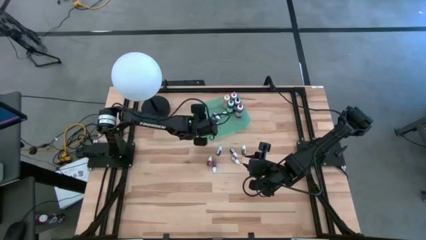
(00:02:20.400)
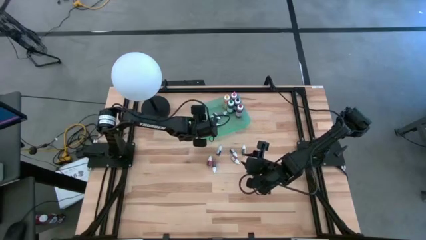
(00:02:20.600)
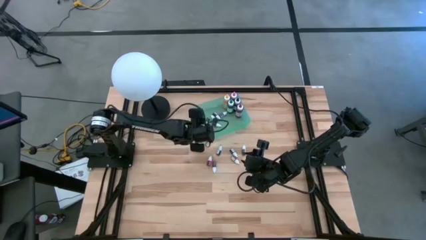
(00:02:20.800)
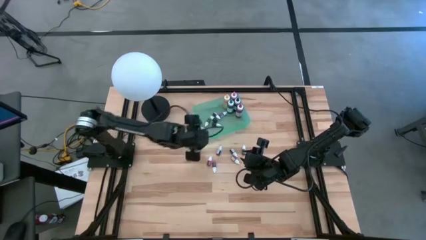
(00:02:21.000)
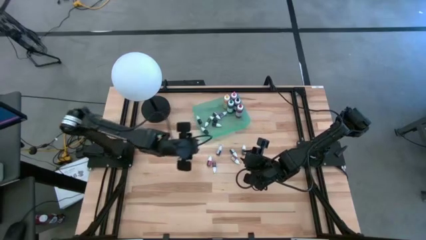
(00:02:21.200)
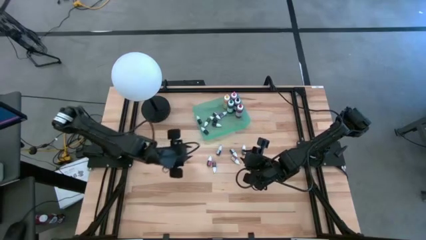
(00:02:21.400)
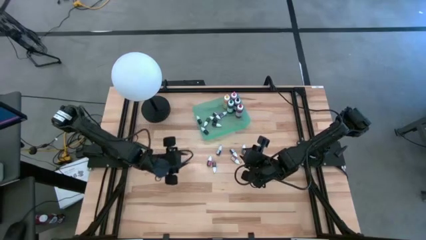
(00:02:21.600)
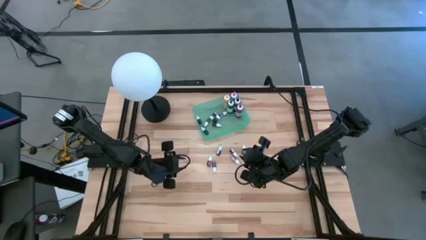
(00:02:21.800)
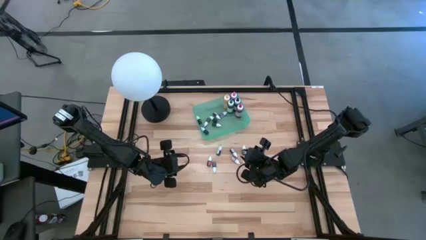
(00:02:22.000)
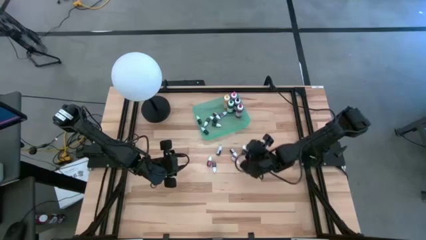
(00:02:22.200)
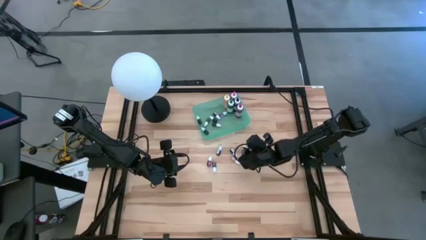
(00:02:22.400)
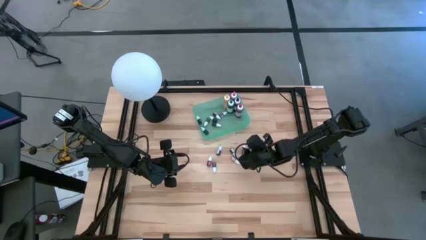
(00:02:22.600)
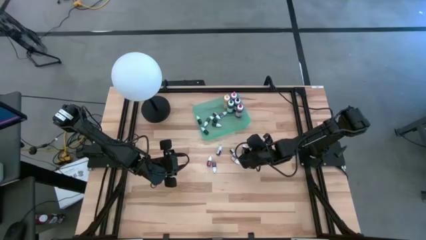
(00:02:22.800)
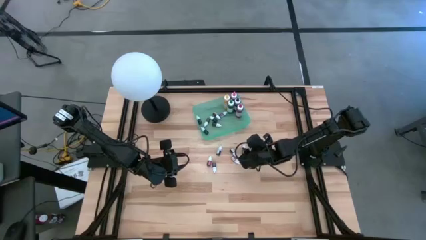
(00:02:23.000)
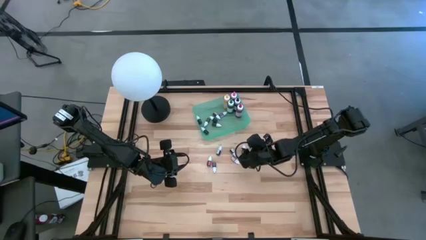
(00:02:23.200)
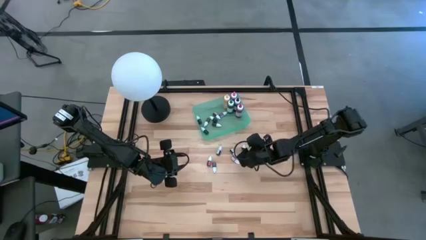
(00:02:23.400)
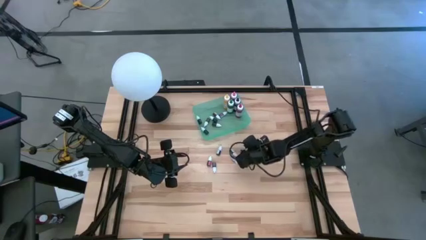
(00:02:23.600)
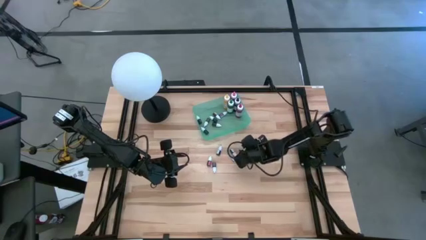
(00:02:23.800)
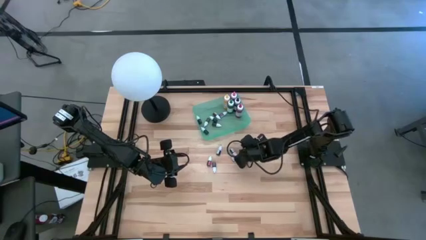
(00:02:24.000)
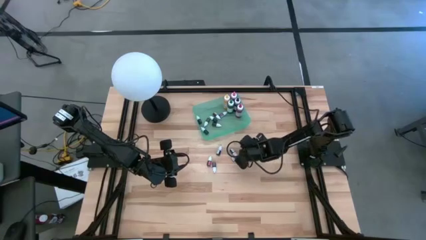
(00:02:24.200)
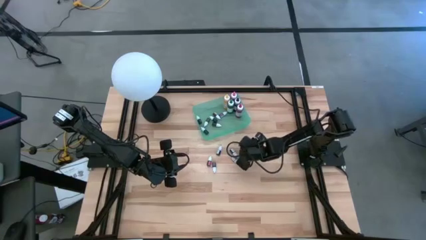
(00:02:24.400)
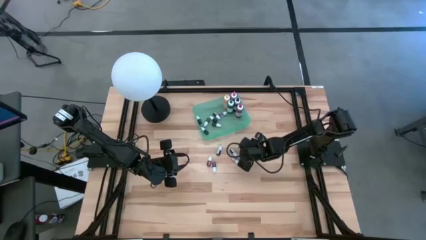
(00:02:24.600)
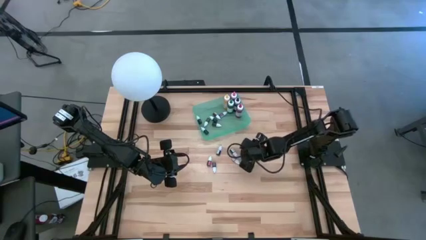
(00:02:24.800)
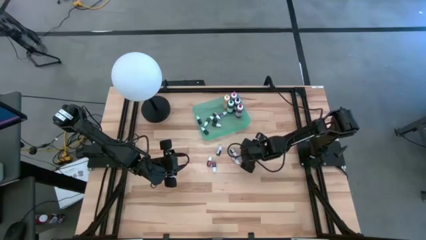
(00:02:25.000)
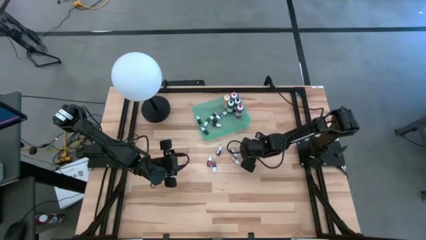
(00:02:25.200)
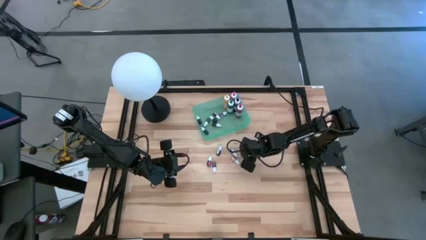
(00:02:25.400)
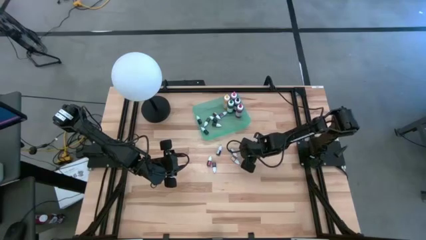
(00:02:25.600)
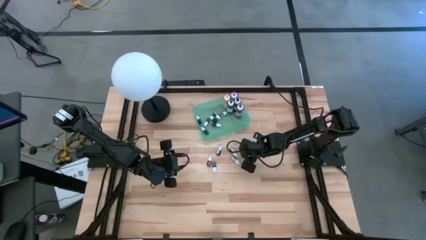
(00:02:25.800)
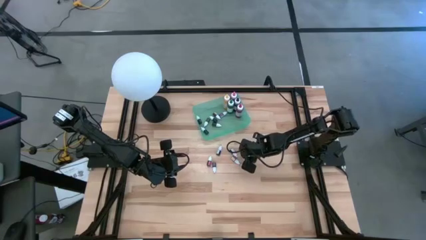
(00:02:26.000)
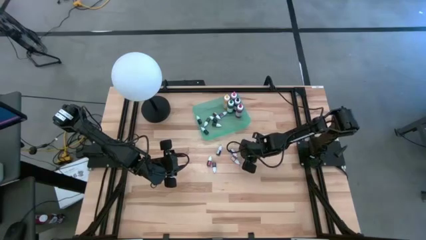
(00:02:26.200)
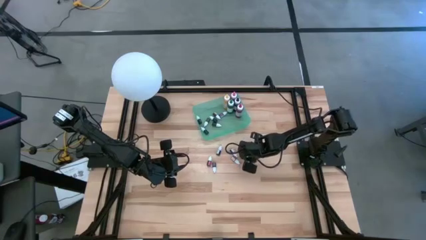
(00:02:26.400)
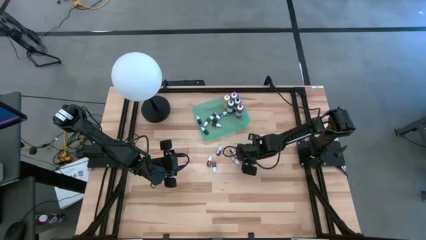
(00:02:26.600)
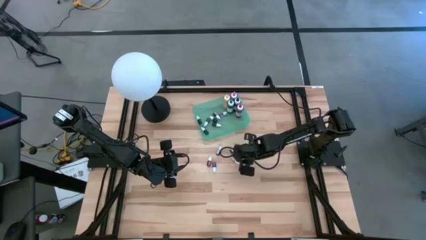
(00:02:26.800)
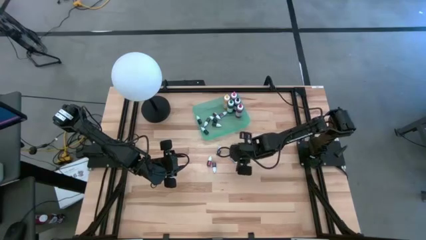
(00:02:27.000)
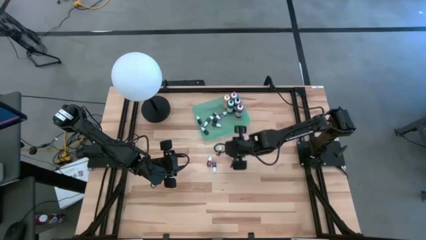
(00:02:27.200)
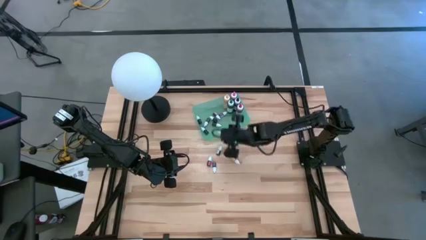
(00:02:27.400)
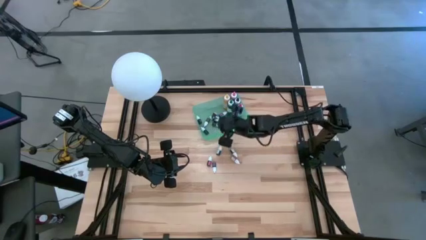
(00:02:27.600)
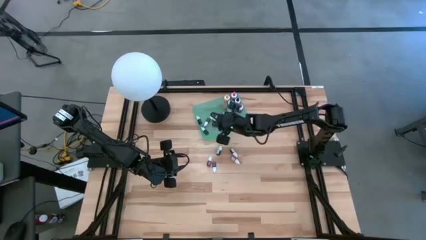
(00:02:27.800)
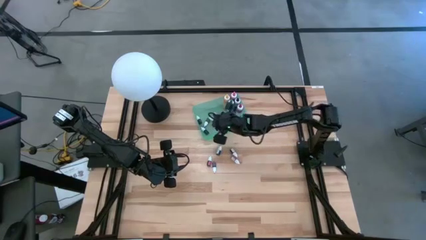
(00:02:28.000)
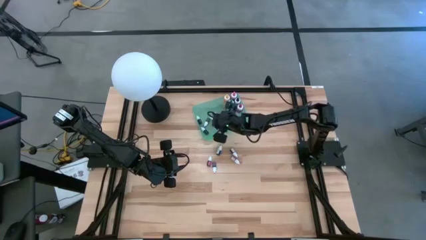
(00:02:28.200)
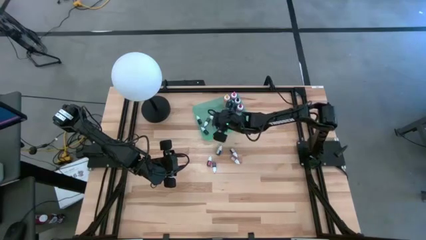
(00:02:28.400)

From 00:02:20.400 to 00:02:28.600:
Task: Pick & Place food coloring
Put the brown food coloring bottle into the green bin

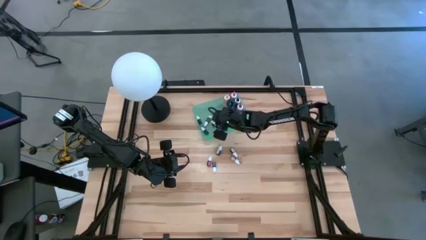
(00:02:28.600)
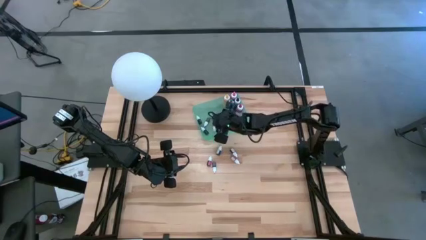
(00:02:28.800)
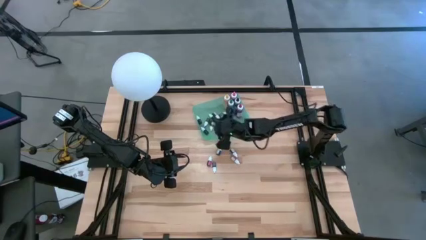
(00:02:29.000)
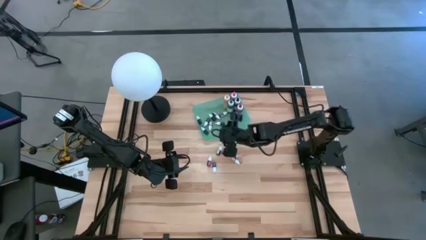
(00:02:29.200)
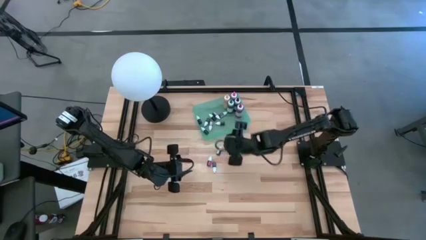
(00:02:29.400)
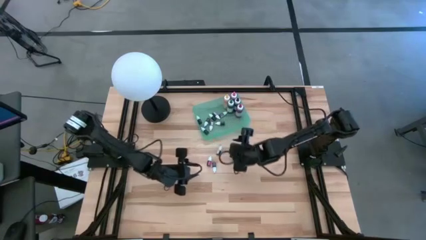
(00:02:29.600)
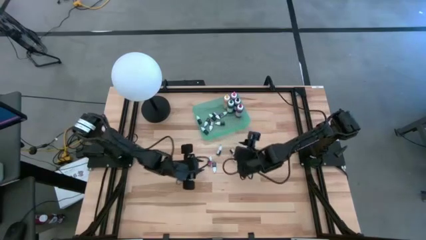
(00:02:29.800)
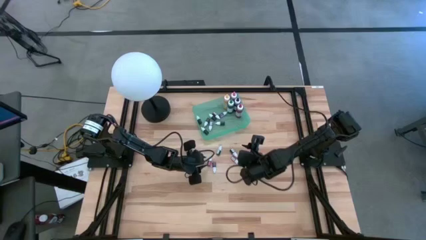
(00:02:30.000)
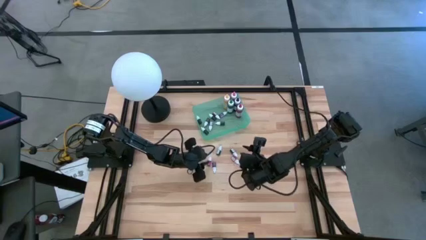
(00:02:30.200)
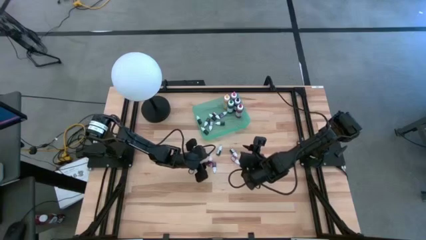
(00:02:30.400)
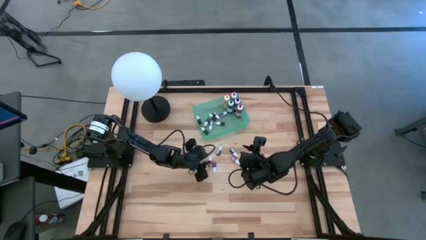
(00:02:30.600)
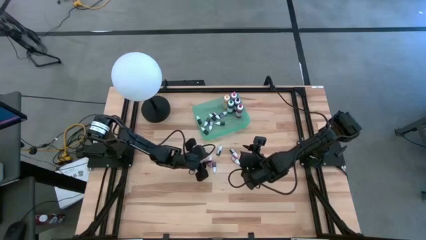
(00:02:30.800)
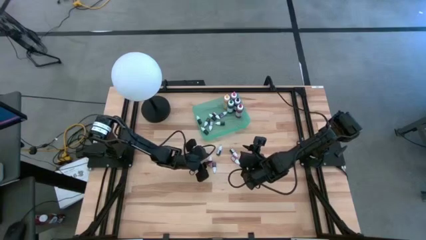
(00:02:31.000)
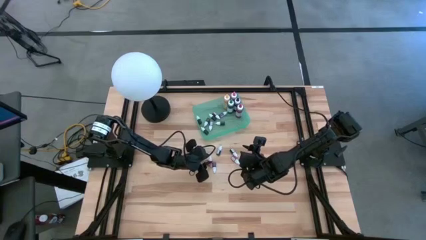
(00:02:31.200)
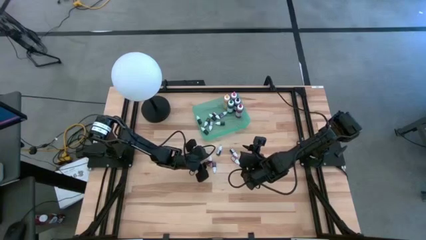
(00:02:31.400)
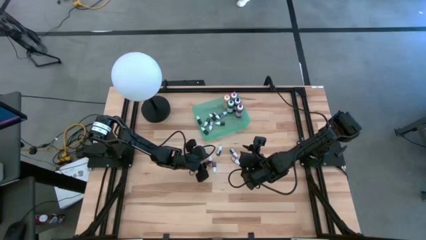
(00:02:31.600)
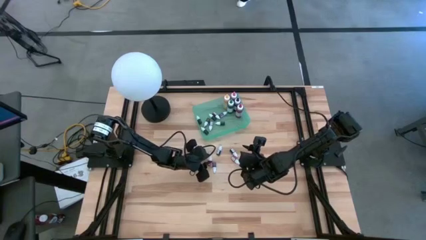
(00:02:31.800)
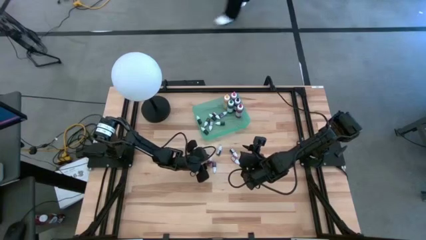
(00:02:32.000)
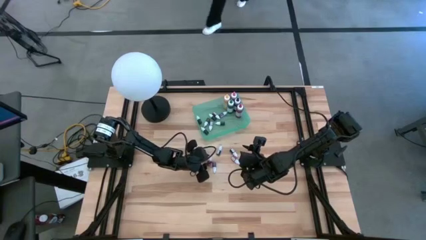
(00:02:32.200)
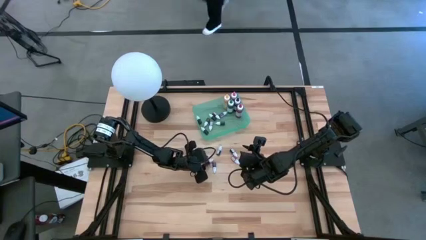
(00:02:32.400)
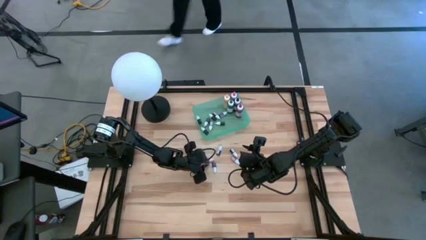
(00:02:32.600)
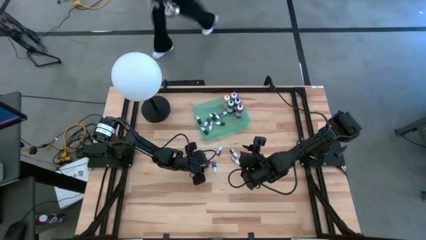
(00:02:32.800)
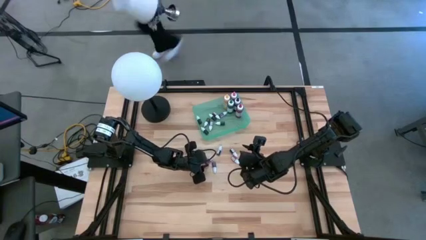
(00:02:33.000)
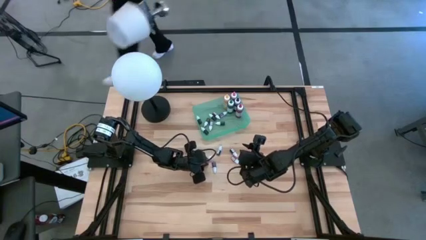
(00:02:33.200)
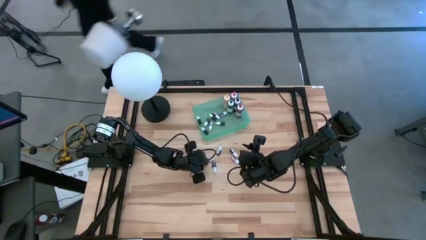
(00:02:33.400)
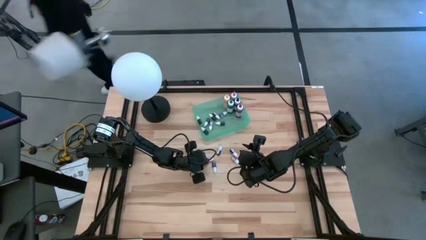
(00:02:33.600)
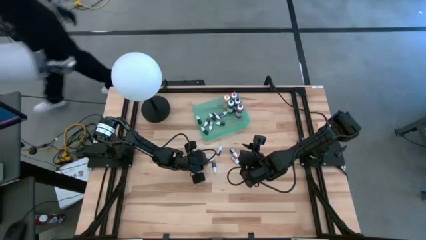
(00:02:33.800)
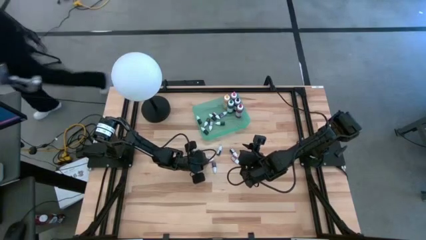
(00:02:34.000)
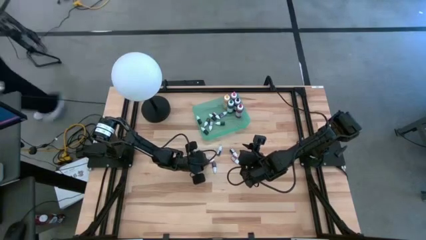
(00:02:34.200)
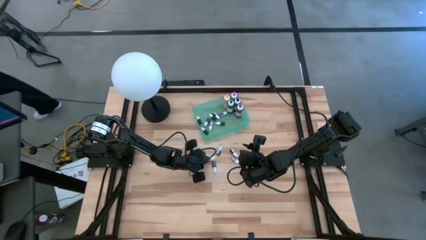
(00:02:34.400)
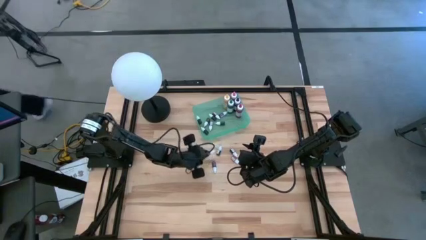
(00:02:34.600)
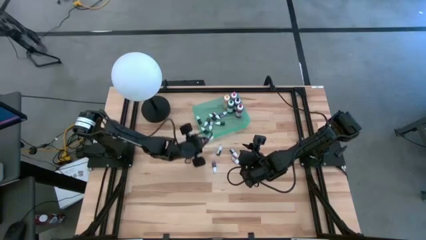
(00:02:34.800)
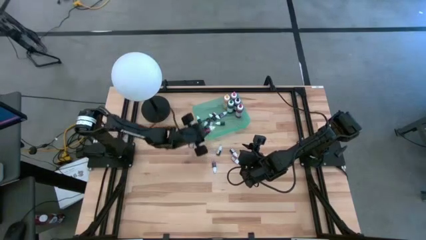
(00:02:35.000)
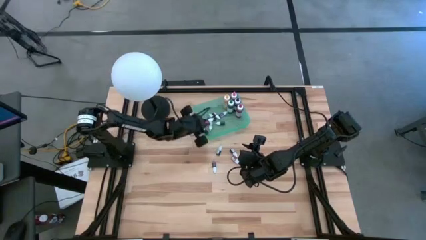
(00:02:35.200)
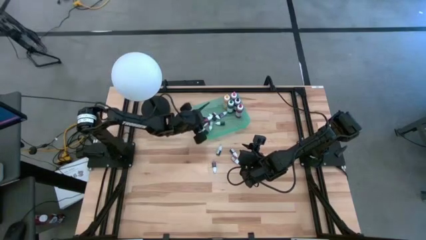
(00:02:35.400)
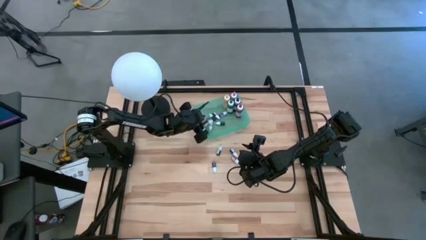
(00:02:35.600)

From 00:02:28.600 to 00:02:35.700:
Put the red food coloring bottle into the green bin
